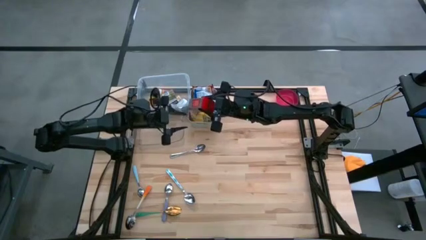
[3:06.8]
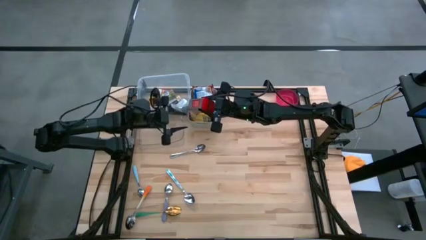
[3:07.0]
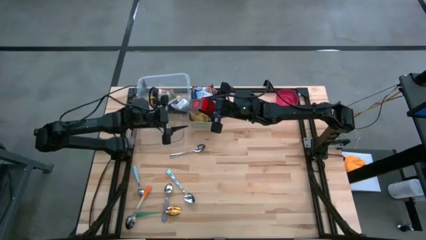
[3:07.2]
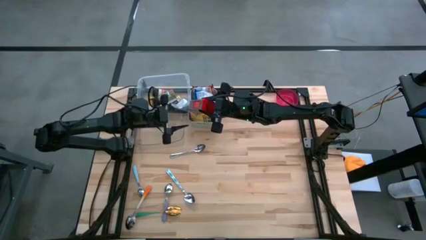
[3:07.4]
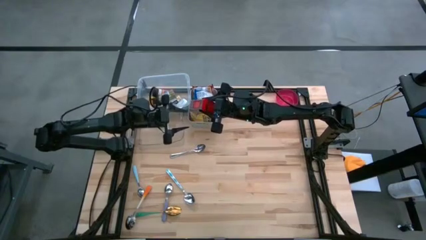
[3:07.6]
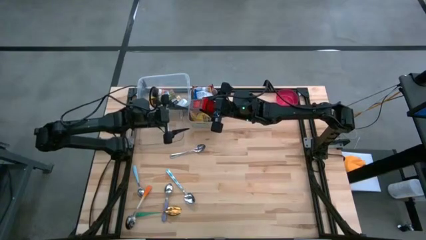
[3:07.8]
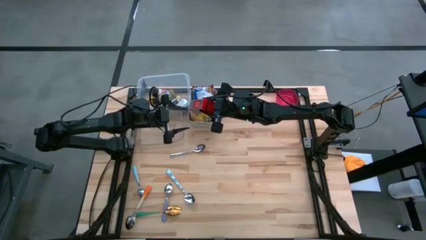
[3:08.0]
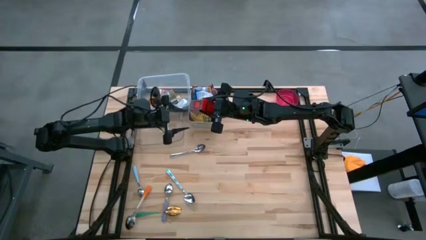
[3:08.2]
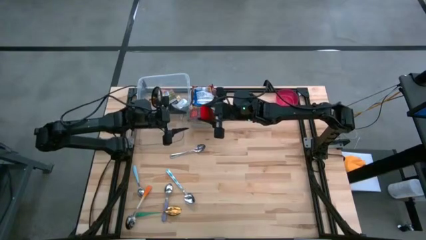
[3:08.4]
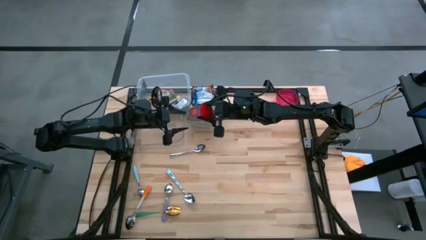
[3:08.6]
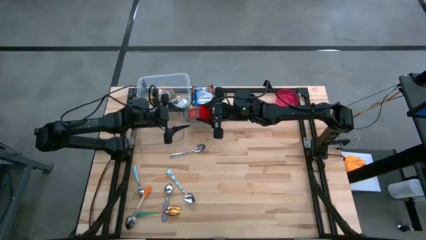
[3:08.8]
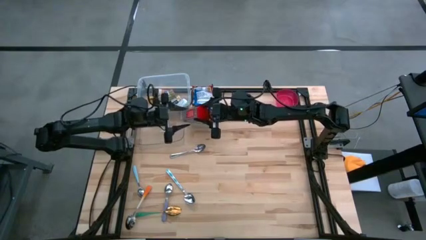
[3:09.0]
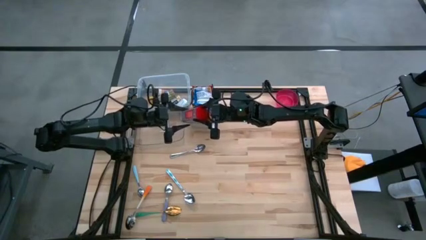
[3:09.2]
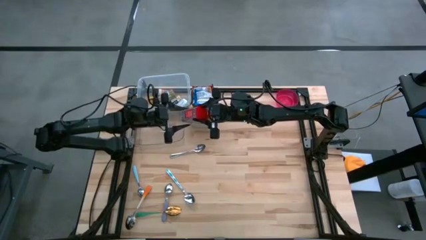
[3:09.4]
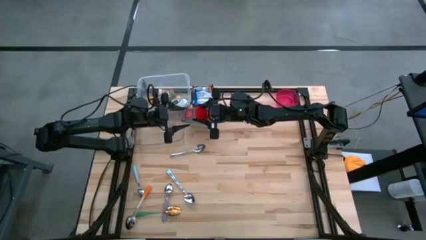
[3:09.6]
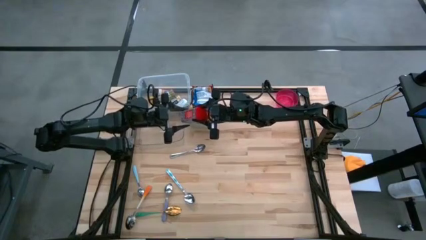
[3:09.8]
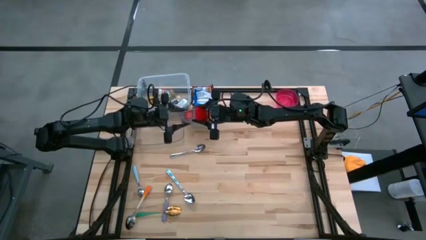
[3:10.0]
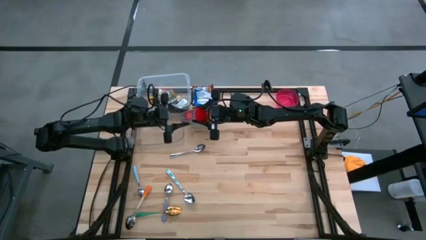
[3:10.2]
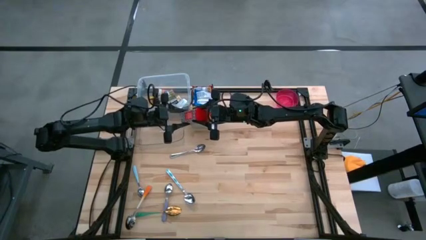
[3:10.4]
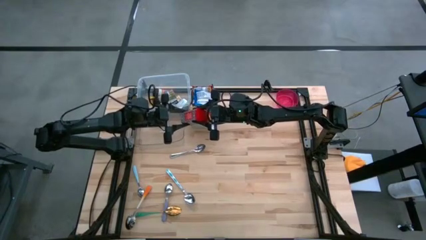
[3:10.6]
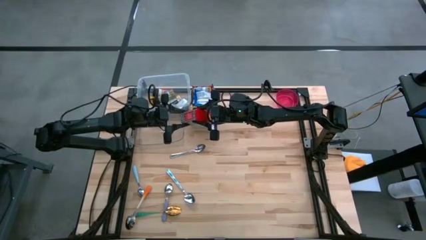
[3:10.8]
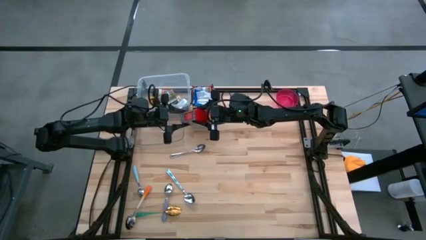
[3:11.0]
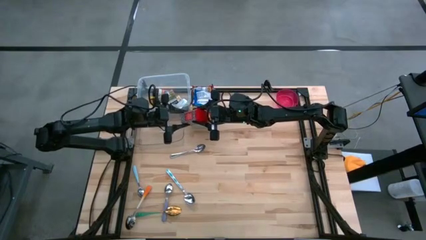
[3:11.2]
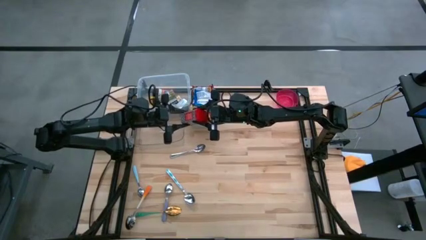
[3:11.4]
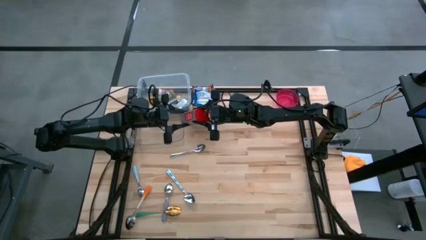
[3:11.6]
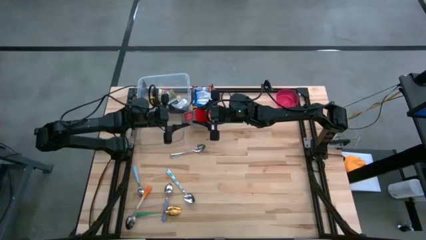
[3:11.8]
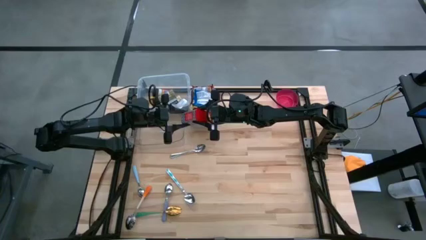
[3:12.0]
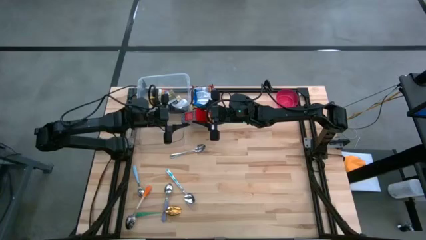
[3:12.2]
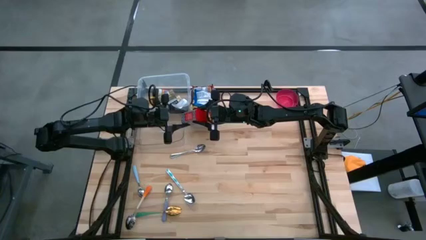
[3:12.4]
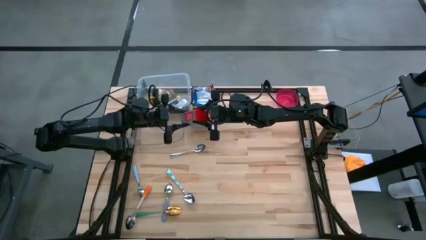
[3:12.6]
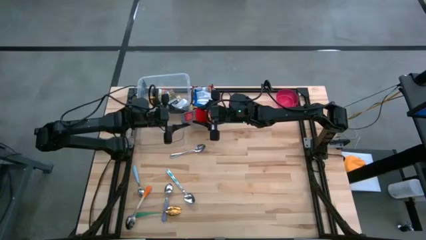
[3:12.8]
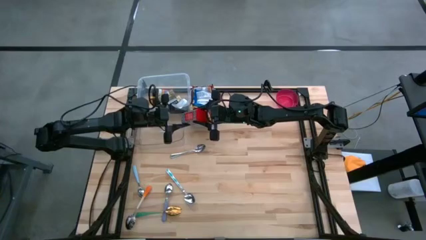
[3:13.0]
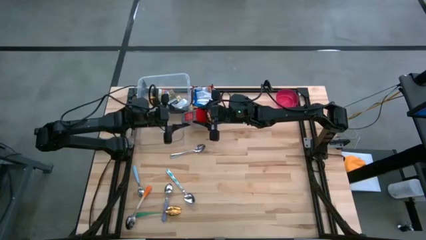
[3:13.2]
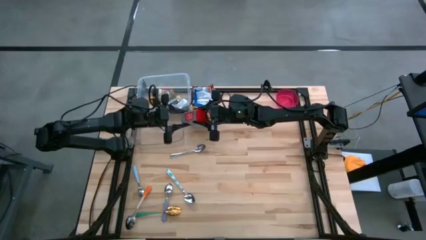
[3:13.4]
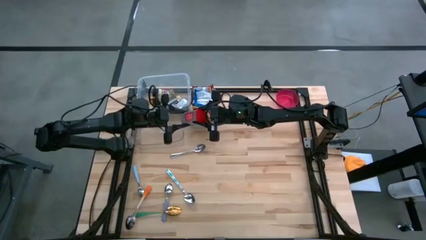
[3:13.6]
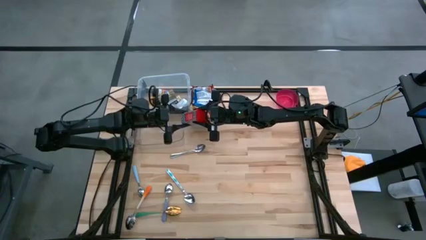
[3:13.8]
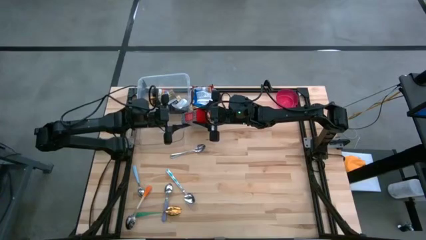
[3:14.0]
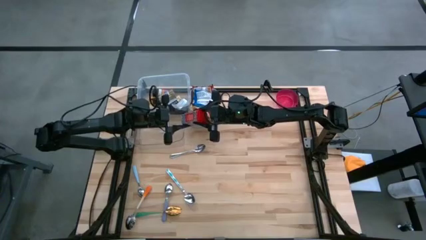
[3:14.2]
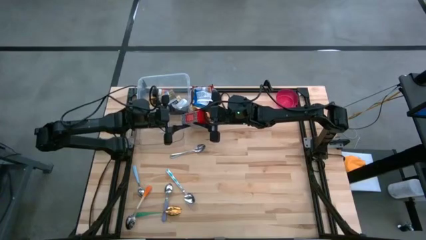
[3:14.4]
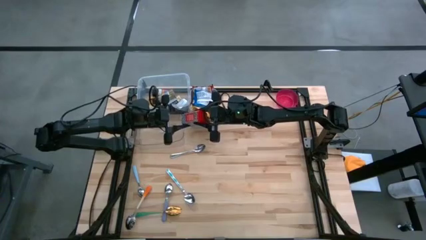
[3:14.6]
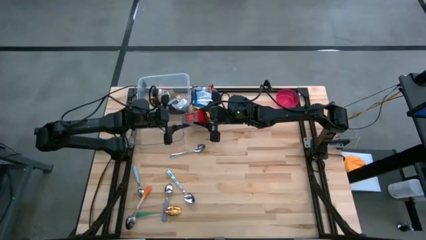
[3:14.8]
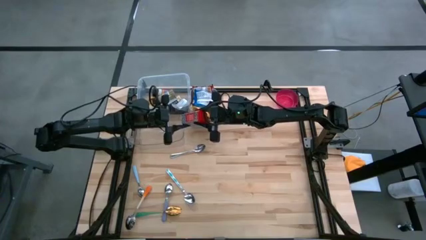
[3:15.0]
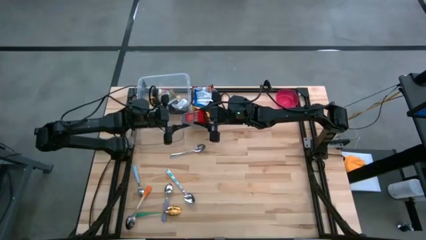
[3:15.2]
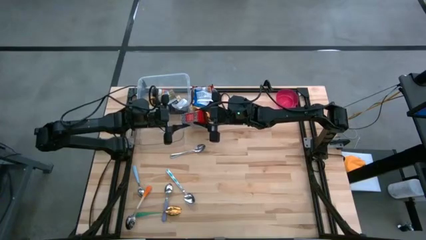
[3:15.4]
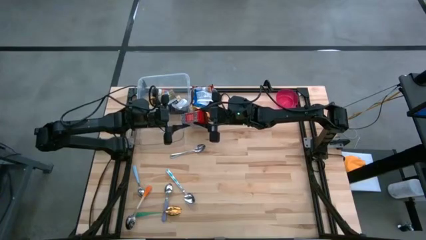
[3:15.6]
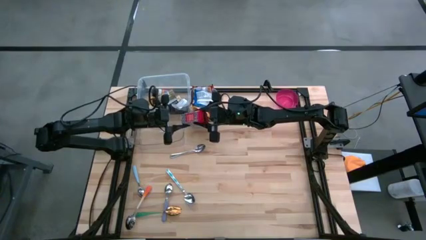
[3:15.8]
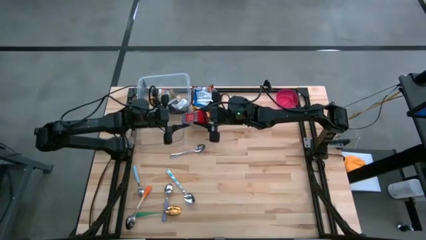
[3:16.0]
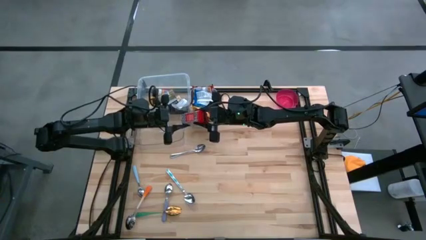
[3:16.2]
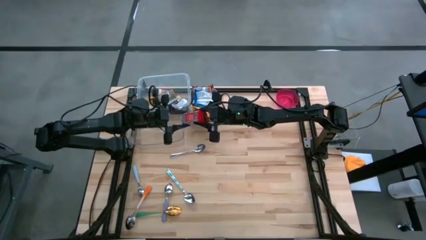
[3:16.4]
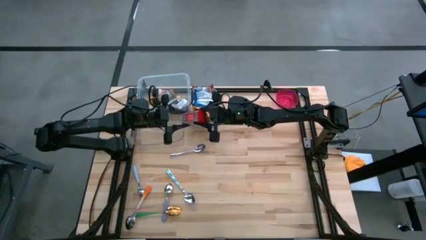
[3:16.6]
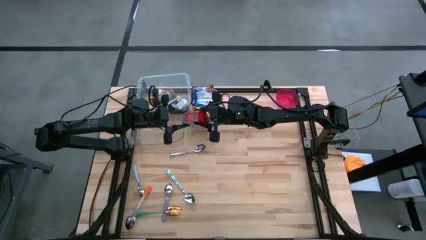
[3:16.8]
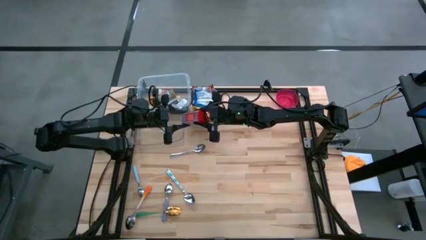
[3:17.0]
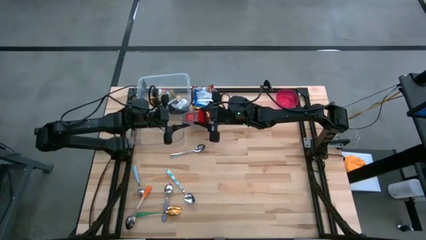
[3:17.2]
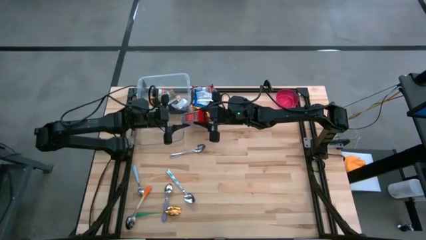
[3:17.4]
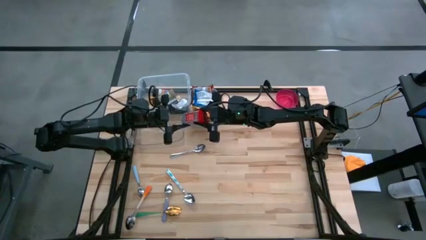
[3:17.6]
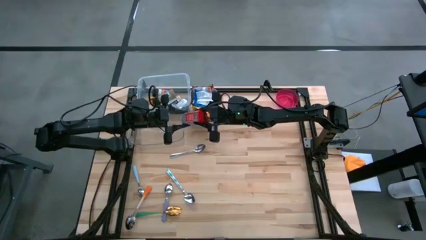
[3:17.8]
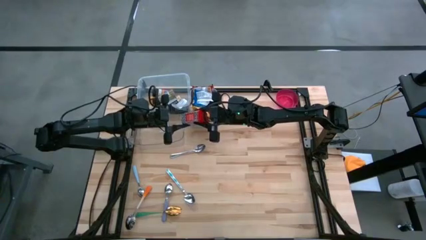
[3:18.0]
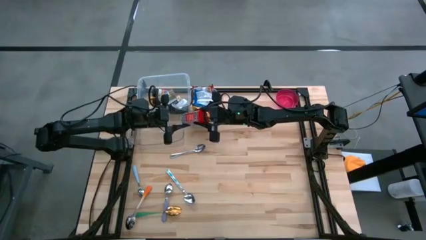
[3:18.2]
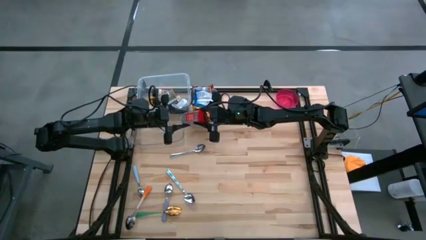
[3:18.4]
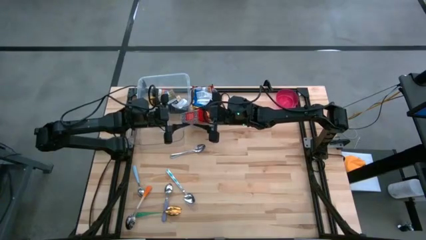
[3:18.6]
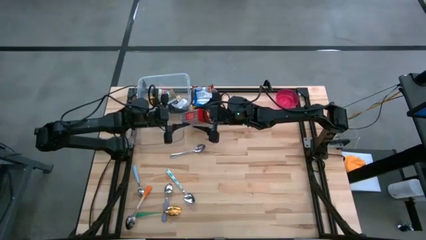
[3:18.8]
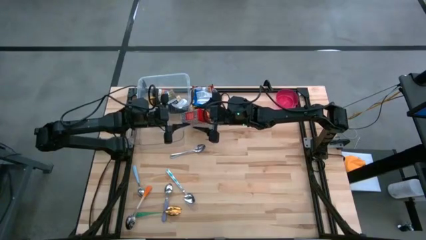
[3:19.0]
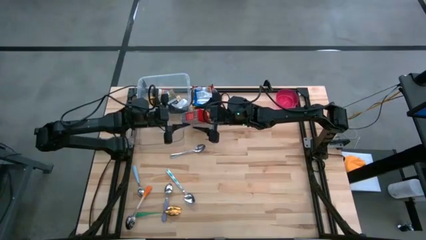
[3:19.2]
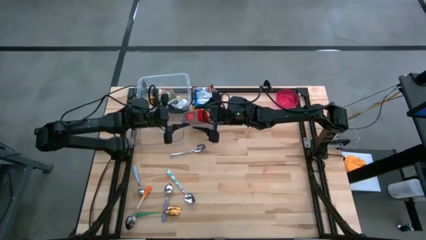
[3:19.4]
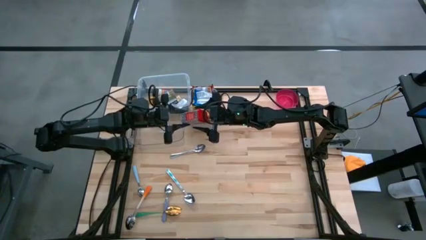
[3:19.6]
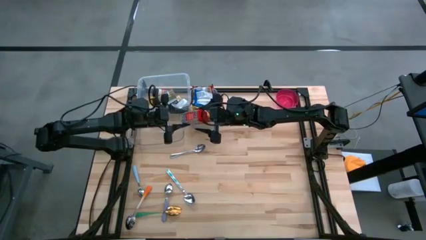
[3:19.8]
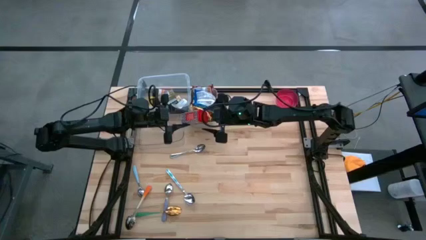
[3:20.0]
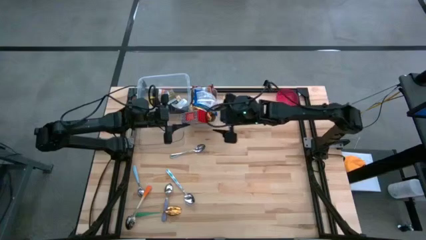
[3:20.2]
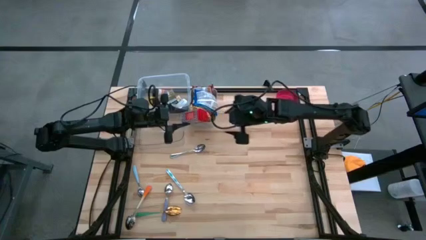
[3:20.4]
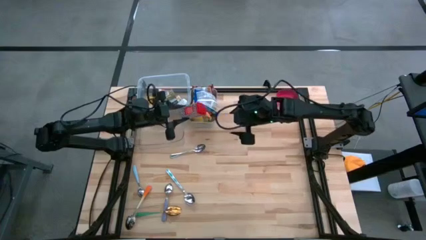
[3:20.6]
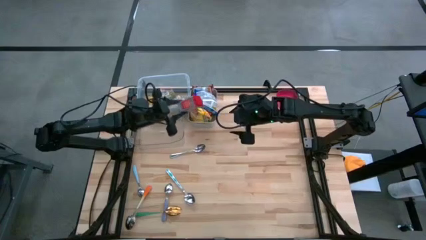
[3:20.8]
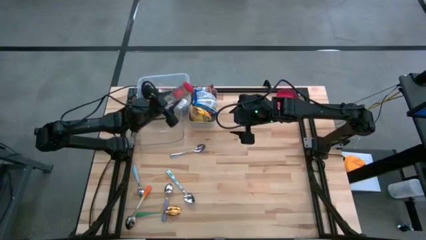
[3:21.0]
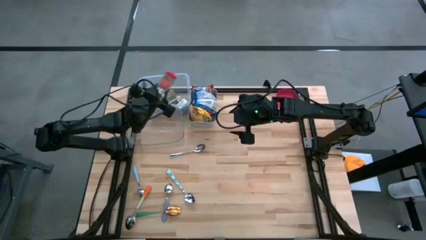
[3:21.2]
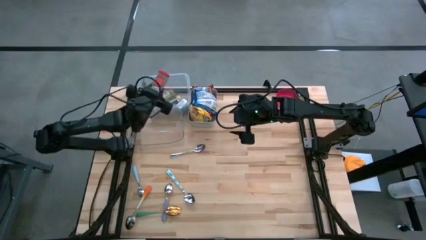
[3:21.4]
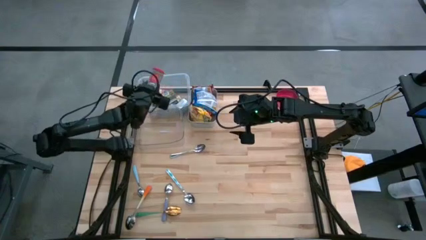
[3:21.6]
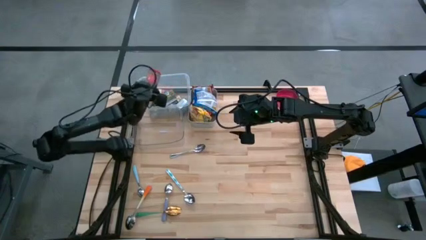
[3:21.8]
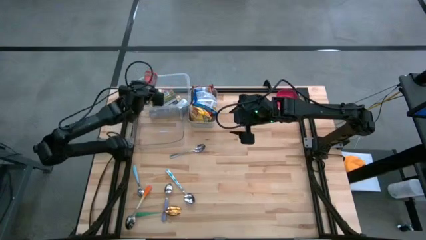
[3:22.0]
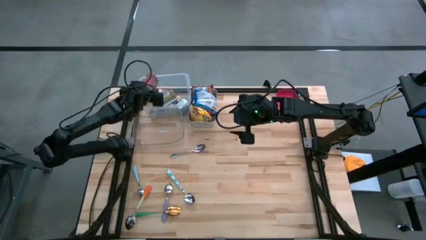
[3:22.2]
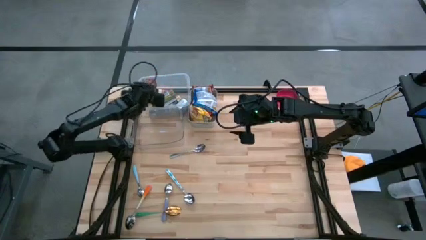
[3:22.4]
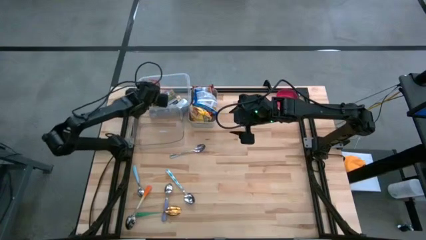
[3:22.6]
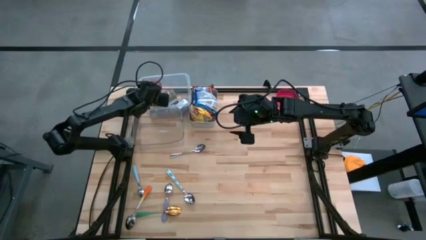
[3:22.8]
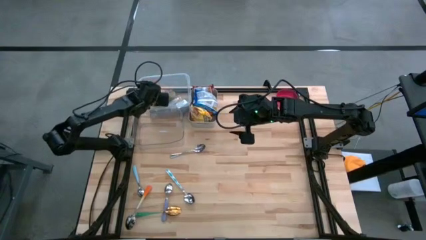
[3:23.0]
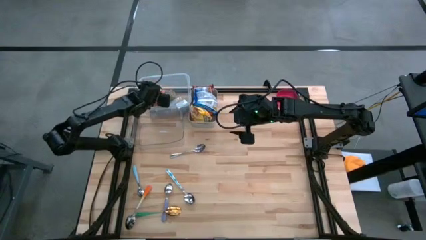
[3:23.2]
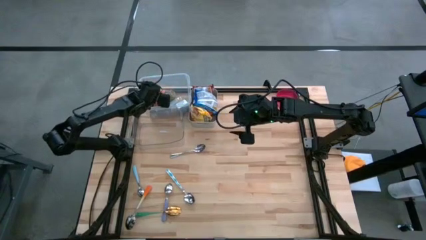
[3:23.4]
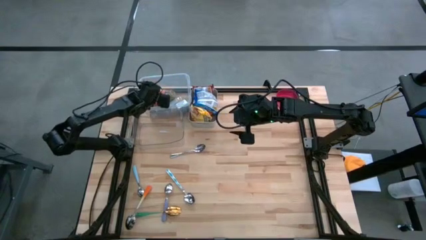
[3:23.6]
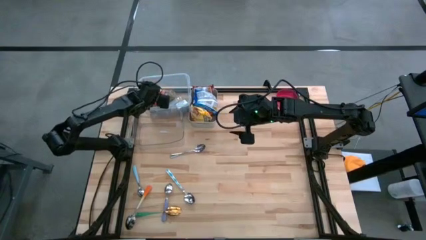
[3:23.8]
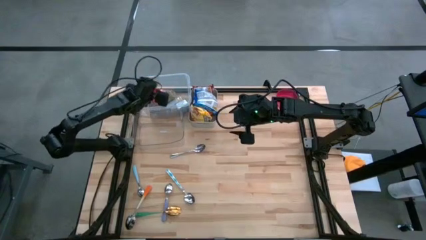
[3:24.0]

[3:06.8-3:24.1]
Put the red seasoning can into the white bin
